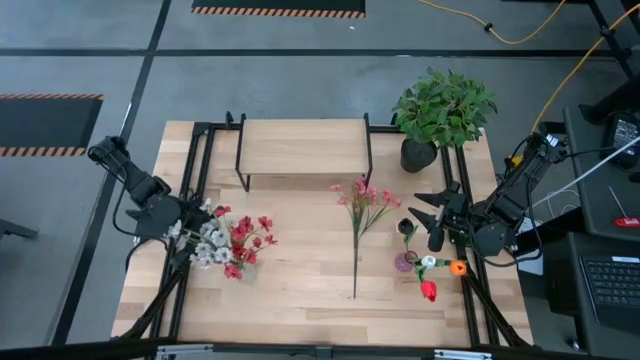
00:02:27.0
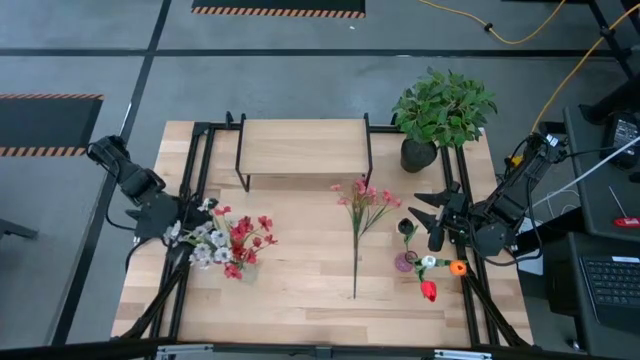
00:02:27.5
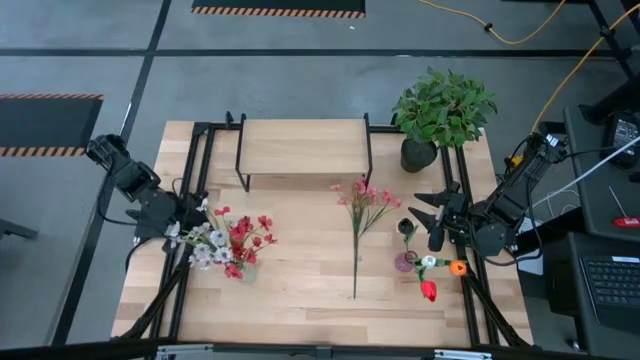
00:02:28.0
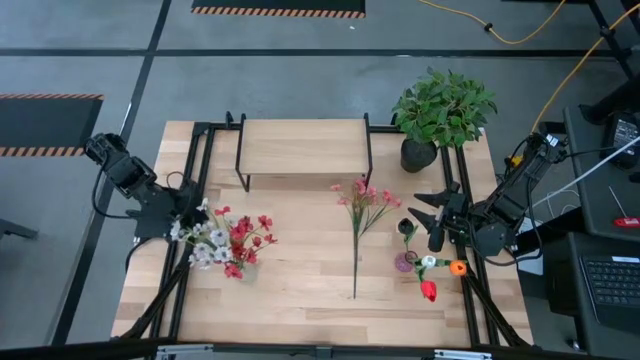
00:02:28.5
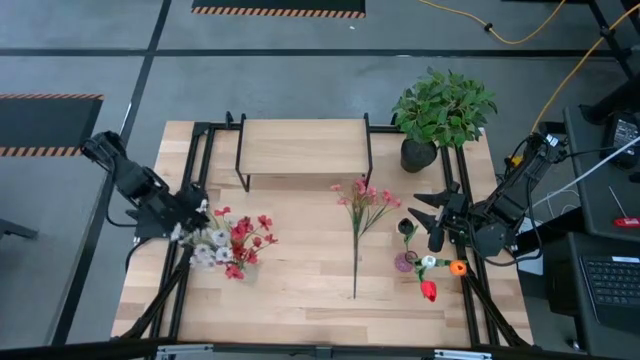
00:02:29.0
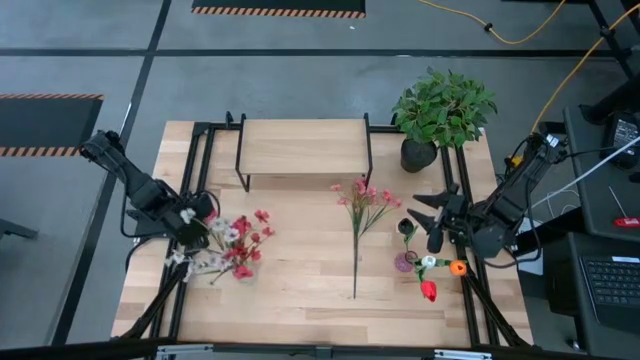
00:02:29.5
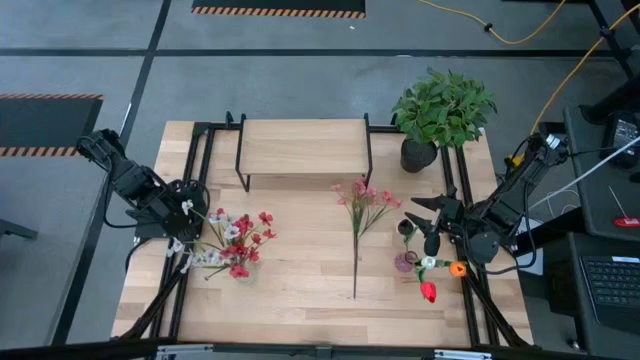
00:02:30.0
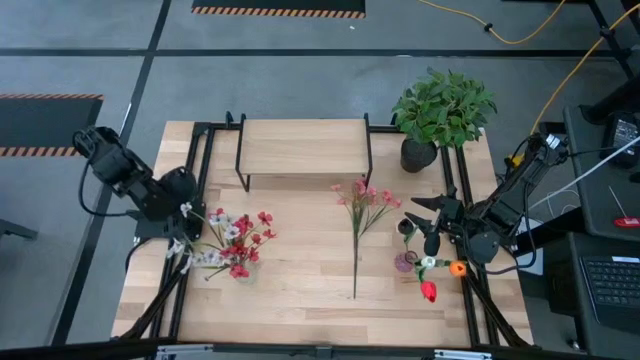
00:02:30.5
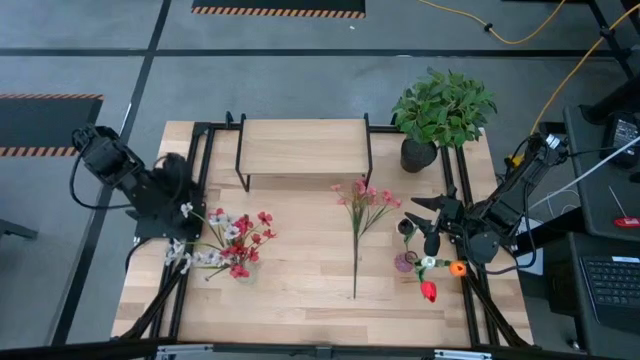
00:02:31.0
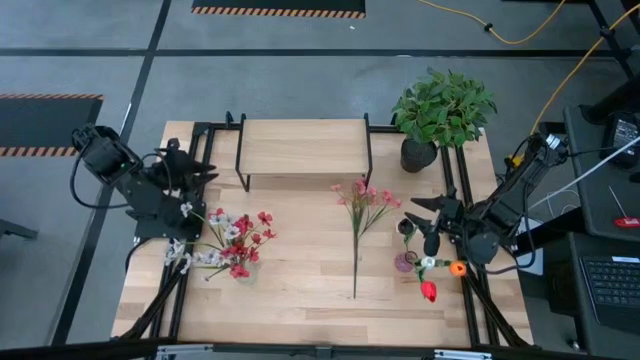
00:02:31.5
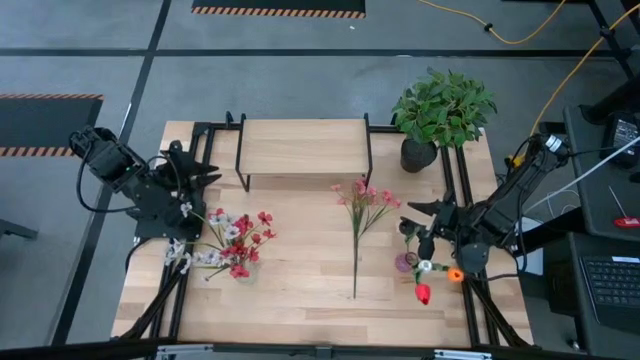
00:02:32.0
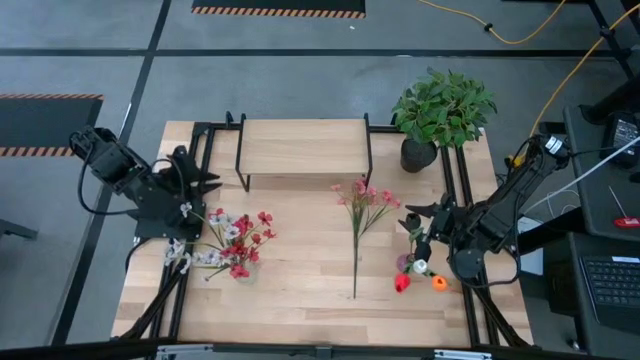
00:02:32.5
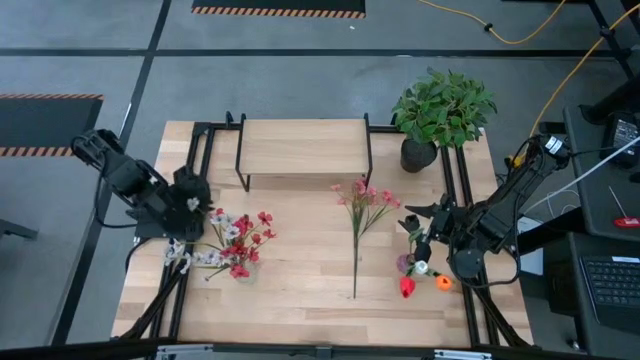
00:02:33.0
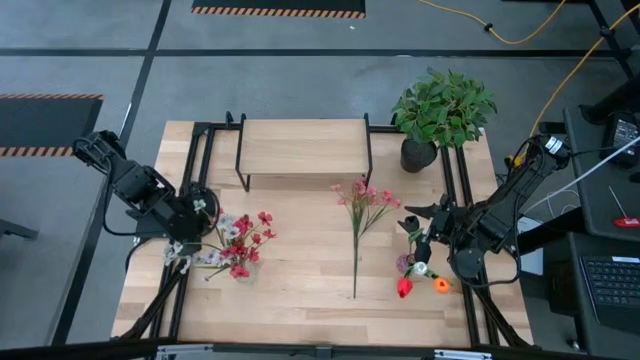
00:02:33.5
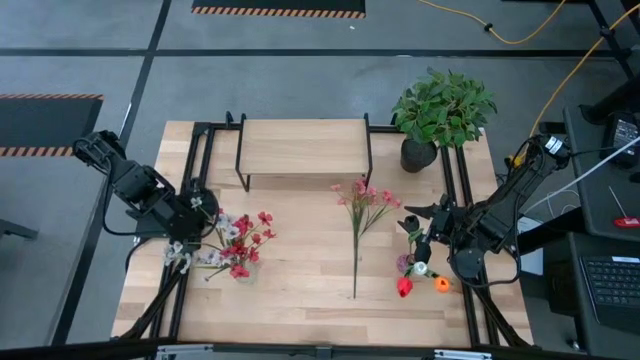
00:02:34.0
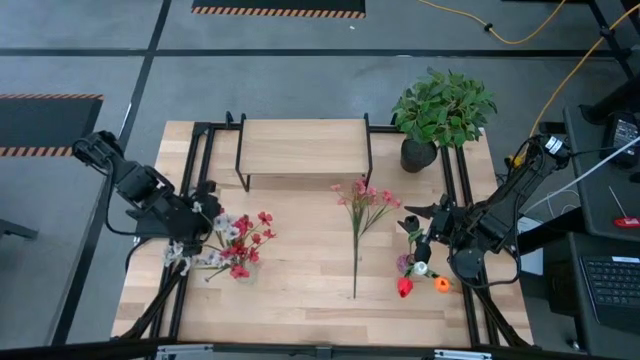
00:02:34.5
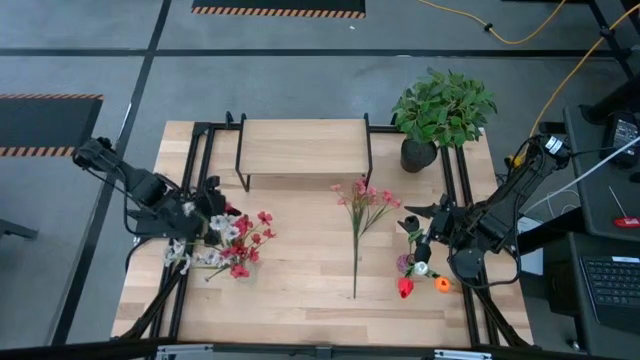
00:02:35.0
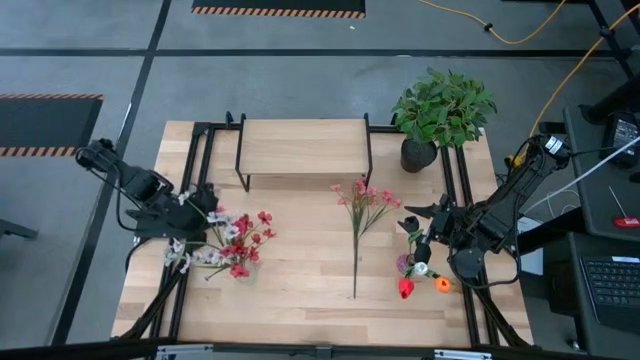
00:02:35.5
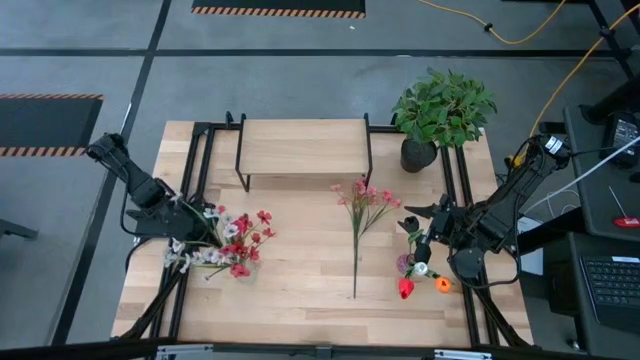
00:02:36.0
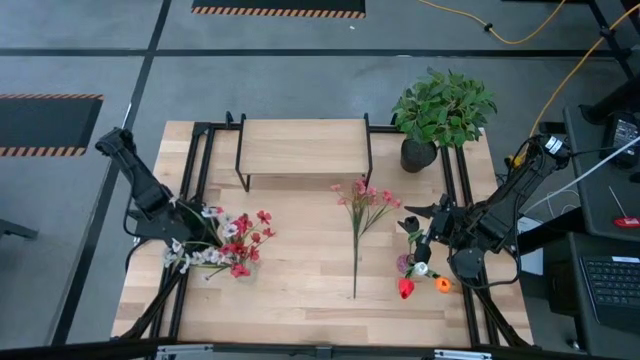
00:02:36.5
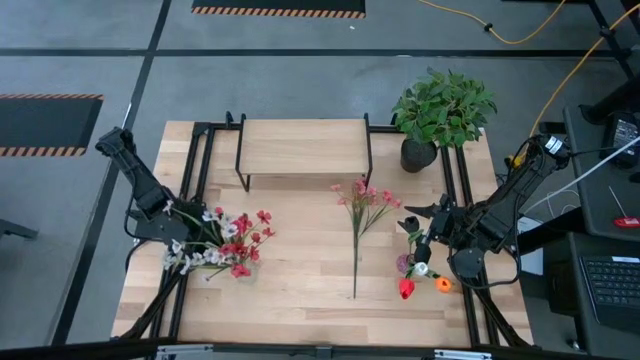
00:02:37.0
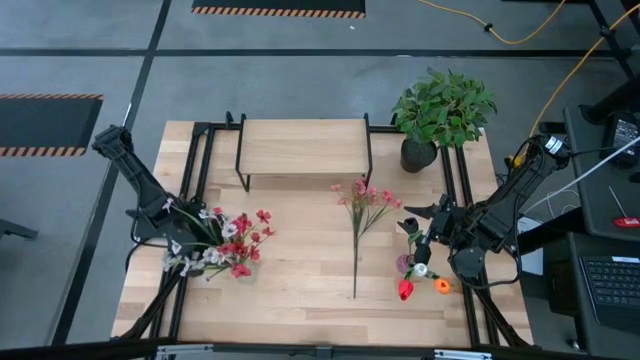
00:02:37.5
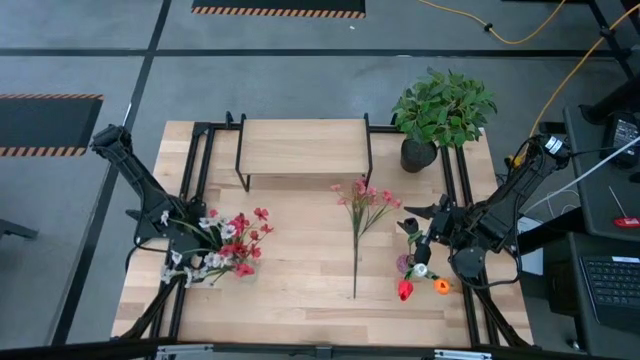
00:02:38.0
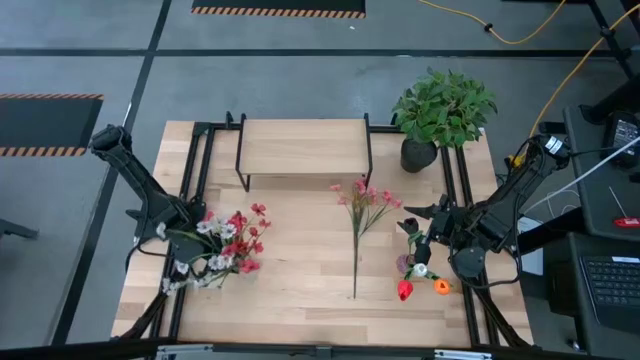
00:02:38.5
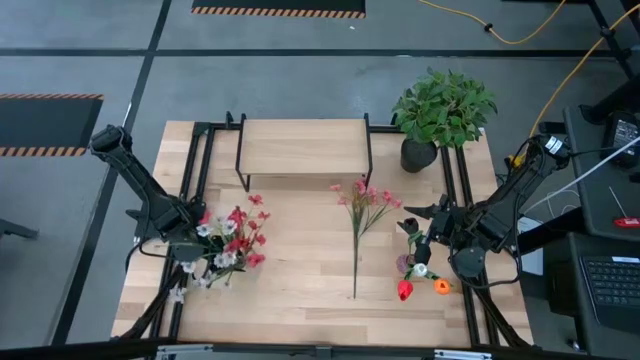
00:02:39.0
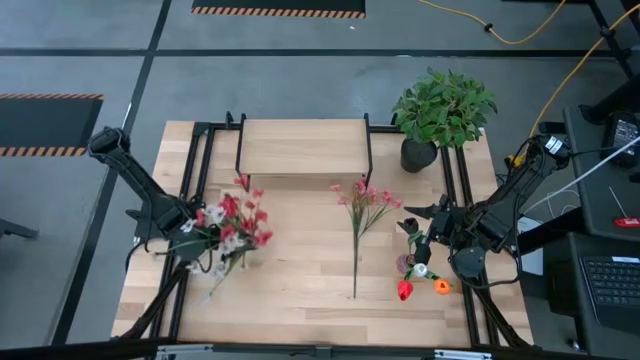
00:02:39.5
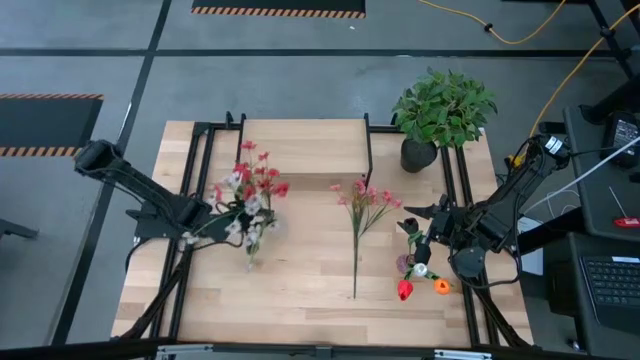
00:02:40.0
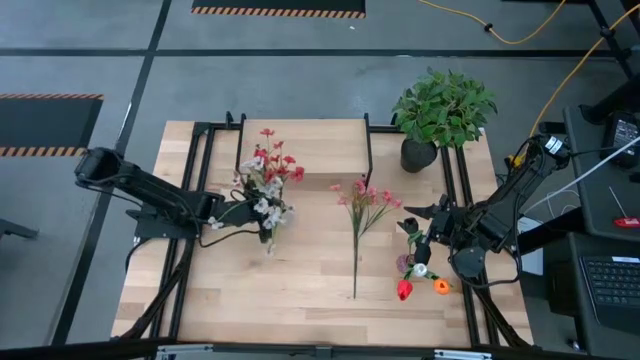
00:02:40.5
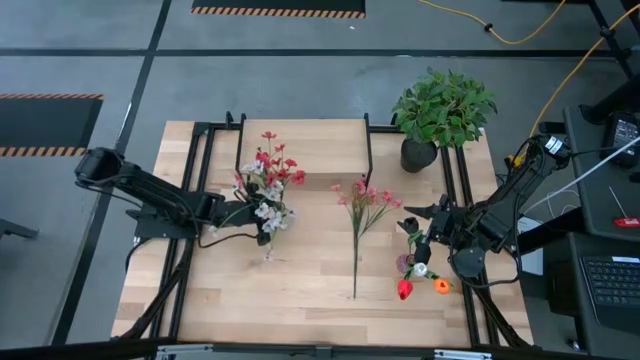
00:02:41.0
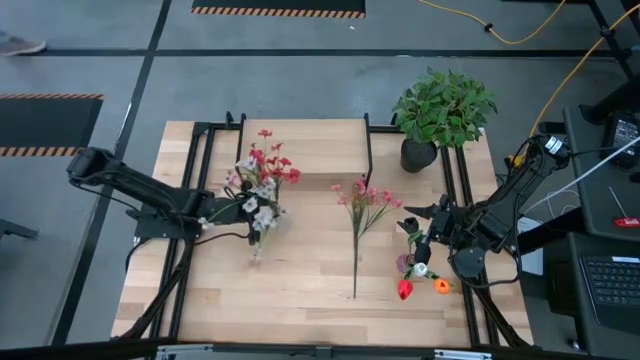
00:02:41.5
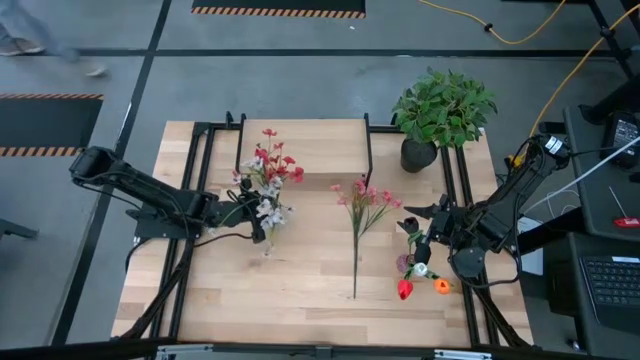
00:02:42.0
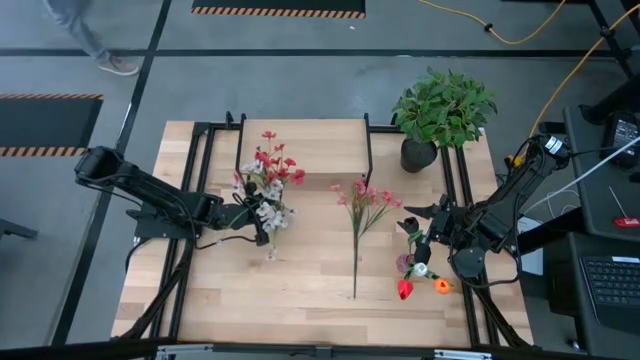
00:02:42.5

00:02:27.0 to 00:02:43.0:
Task: Pick and place flowers into a vace then onto a shelf
Move the transparent vase to the middle of the table

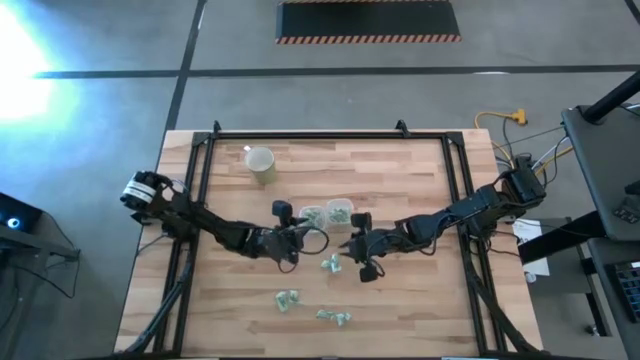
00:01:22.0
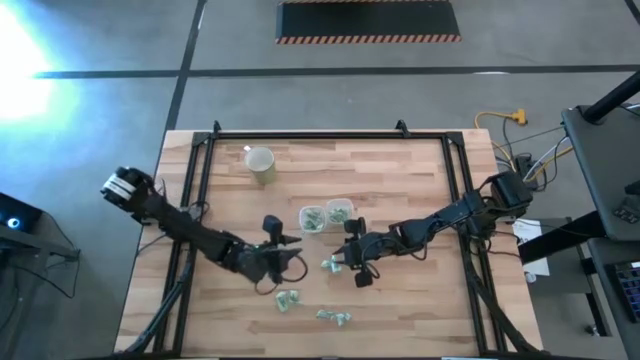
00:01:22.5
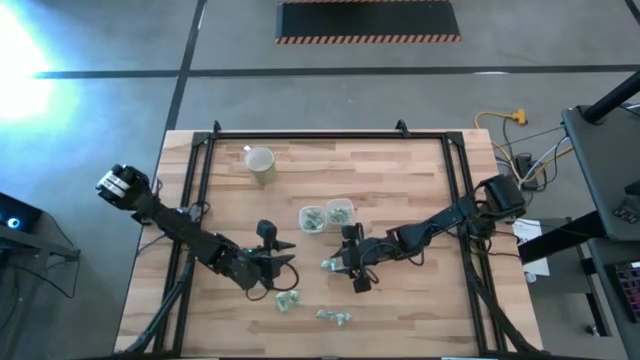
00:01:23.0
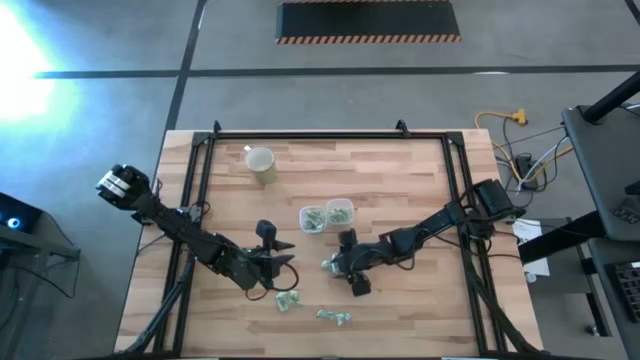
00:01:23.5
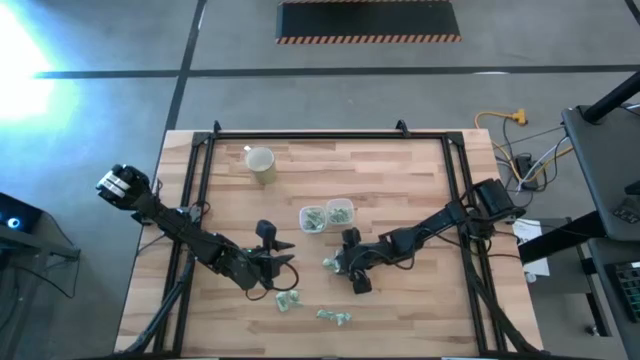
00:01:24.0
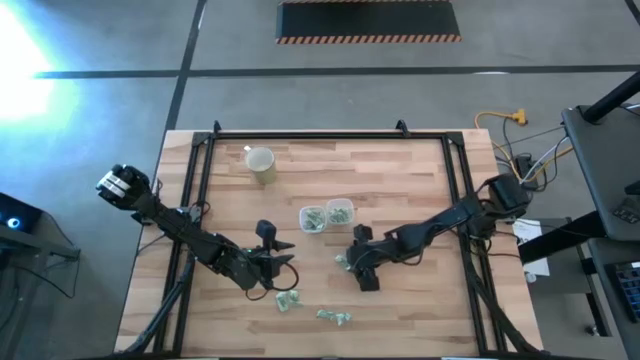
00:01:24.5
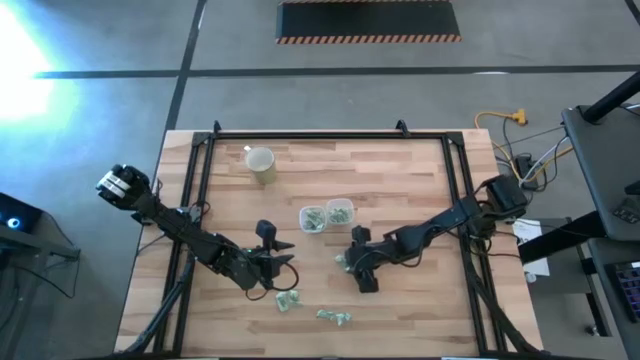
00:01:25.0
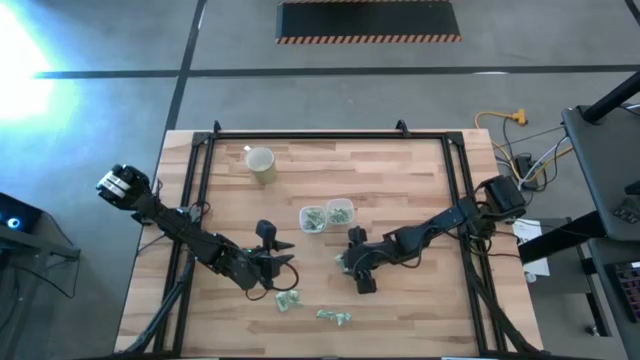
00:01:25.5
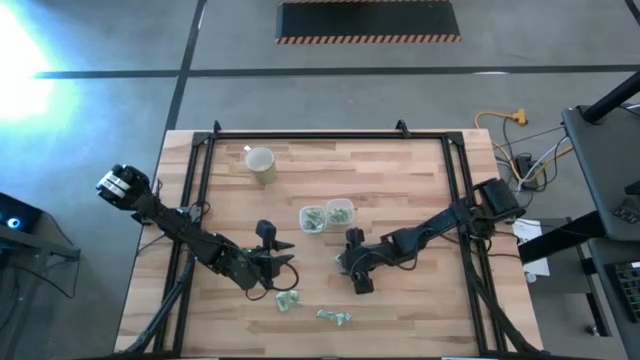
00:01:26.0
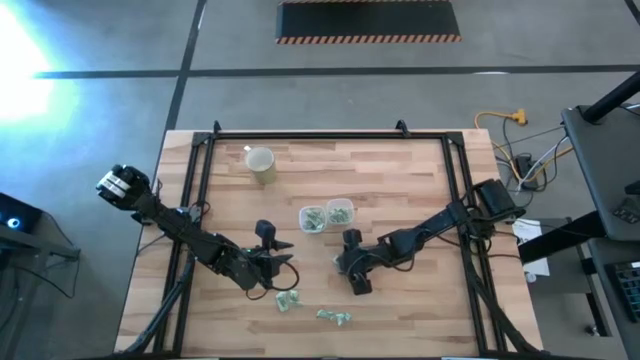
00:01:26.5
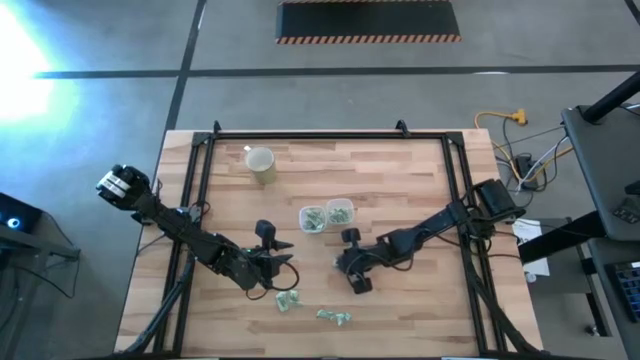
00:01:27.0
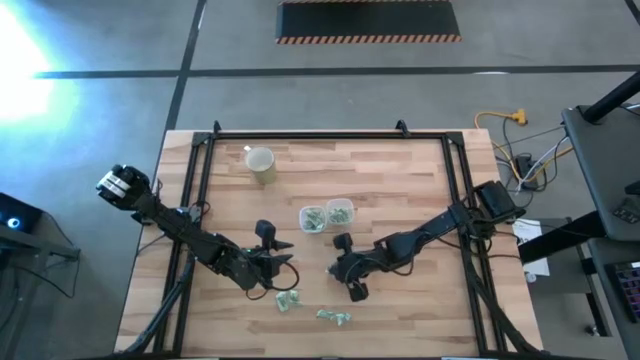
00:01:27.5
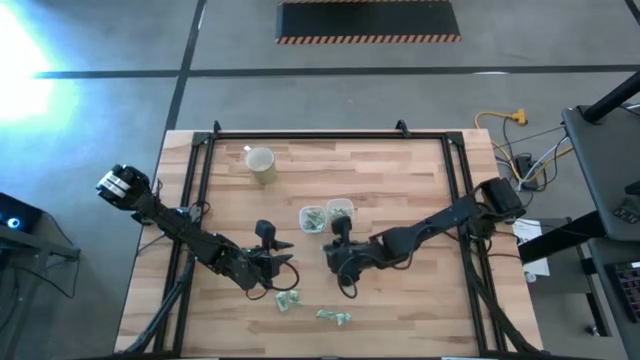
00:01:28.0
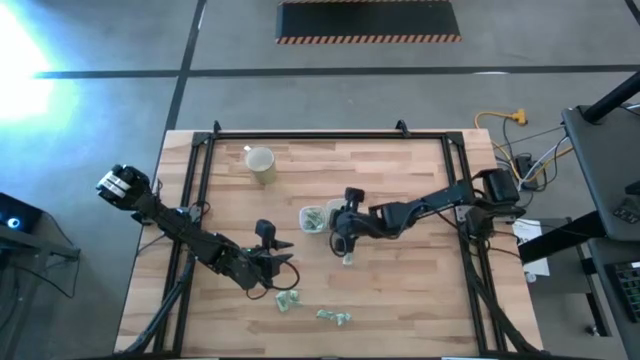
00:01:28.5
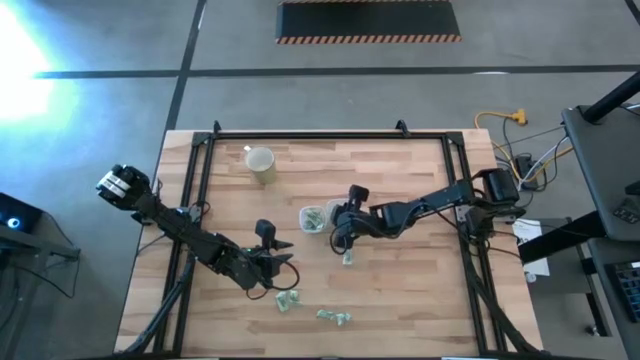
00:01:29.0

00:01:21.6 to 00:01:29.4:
Task: Pick and place items into bin
Put the stevia packet into the right transparent bin
